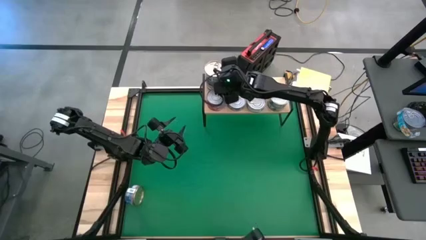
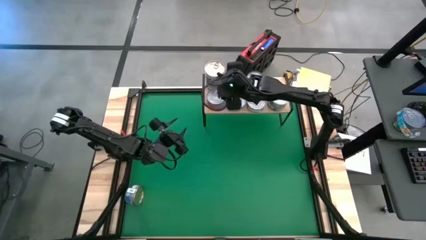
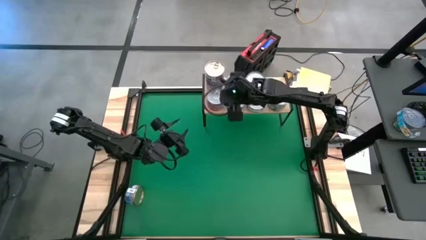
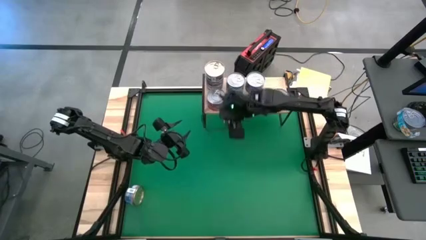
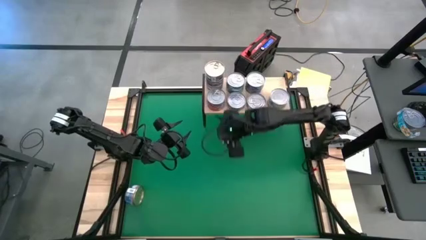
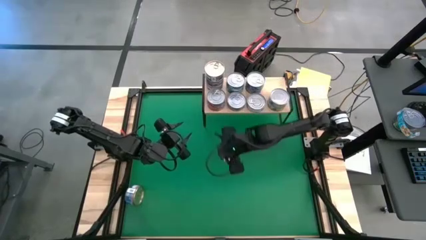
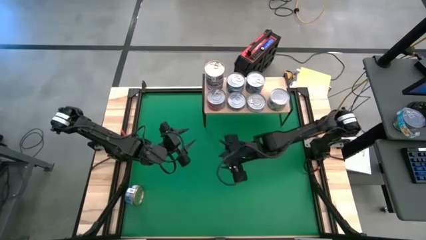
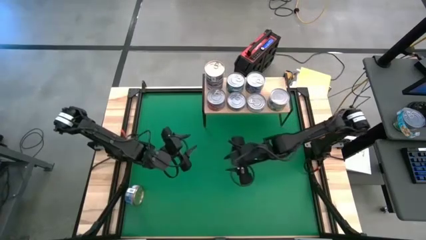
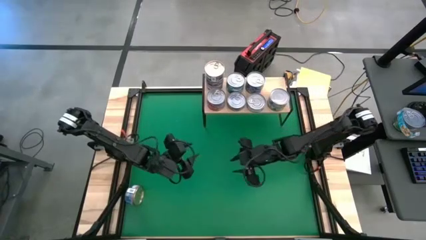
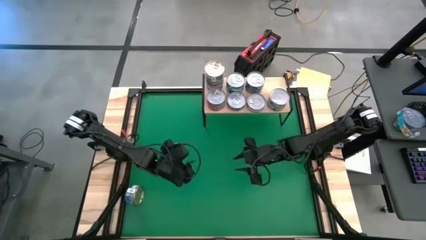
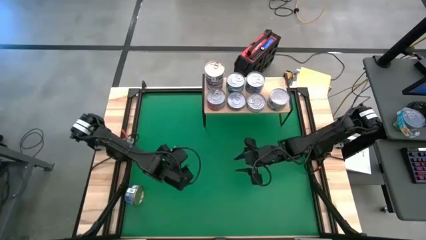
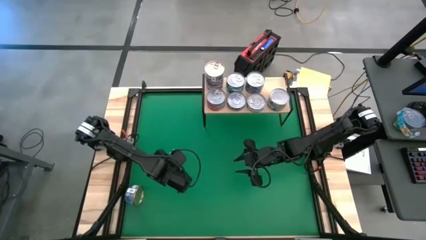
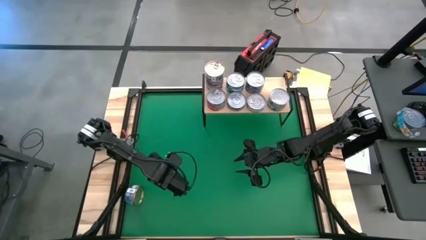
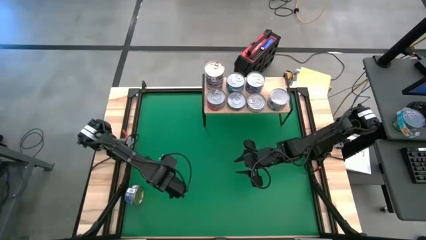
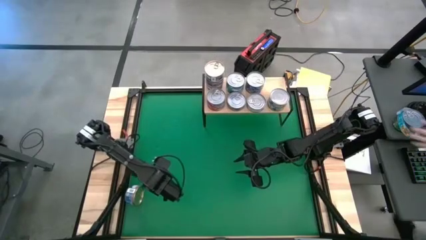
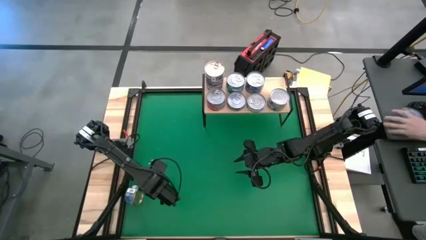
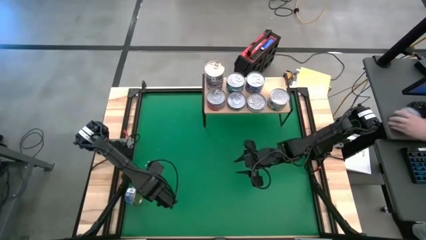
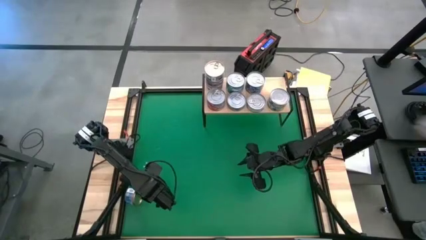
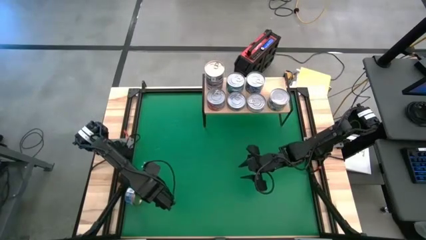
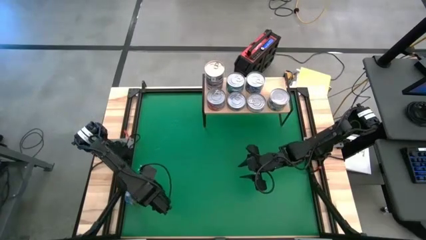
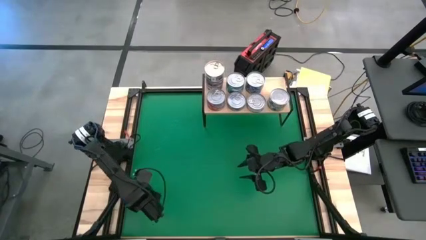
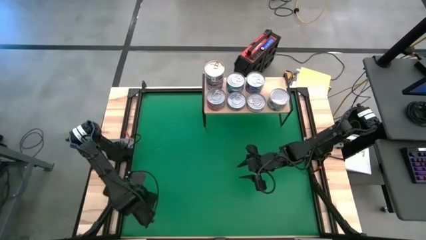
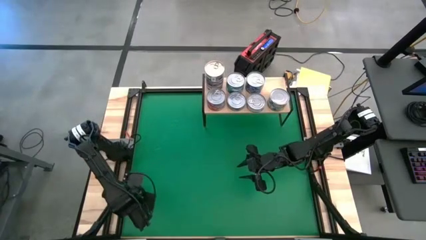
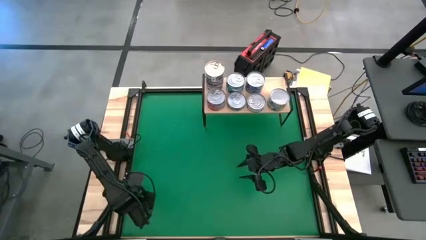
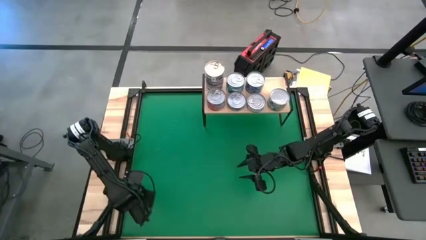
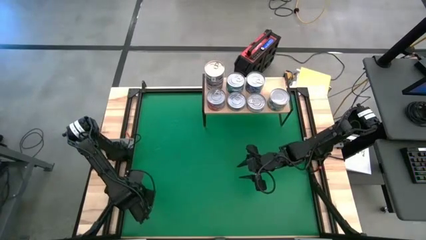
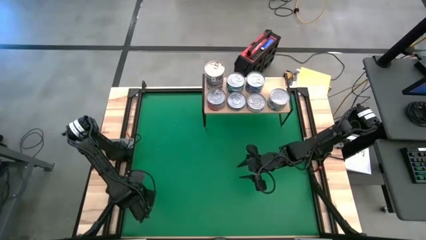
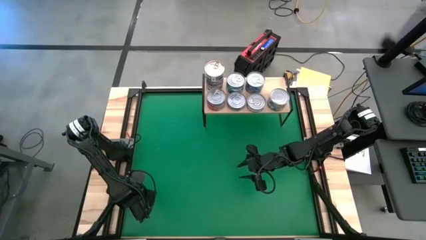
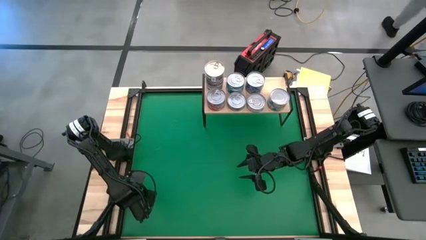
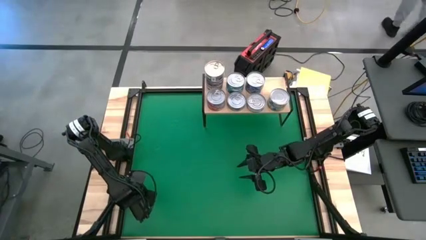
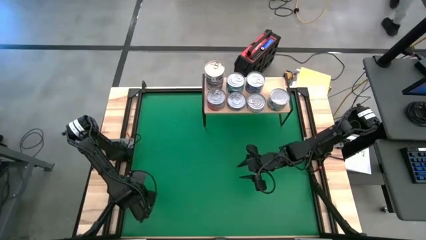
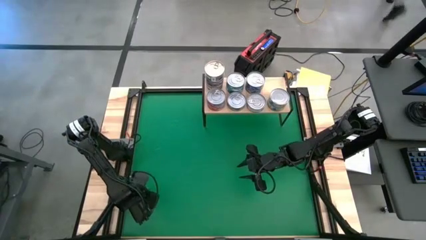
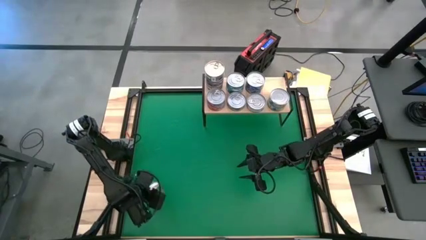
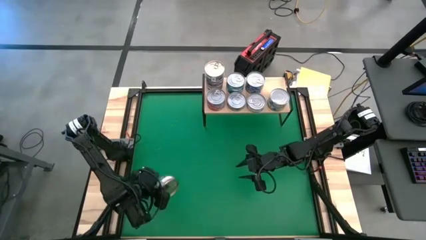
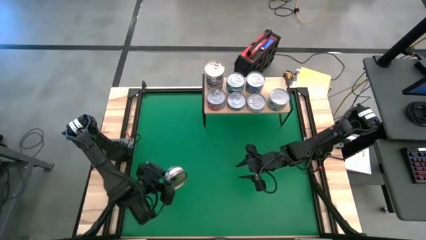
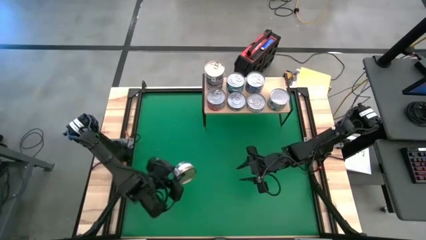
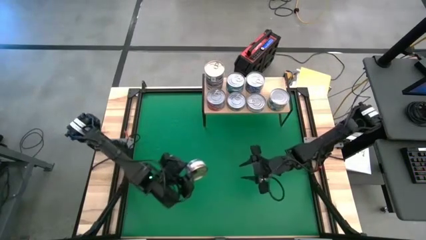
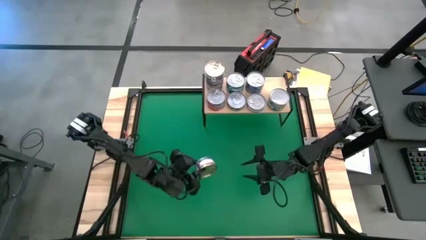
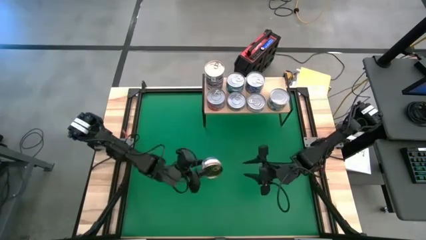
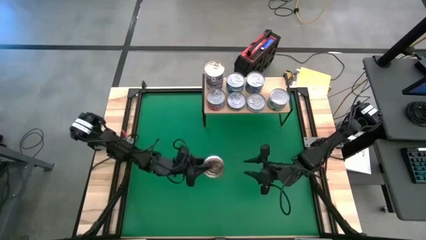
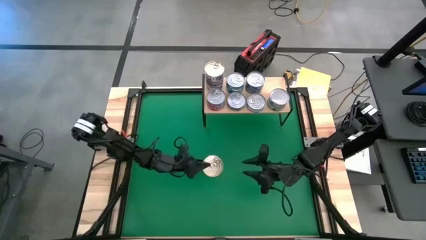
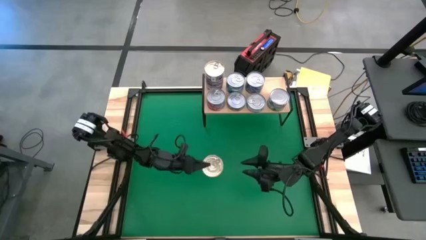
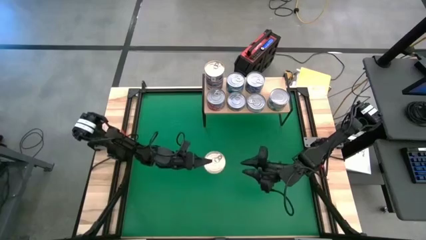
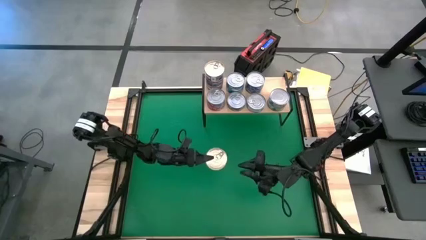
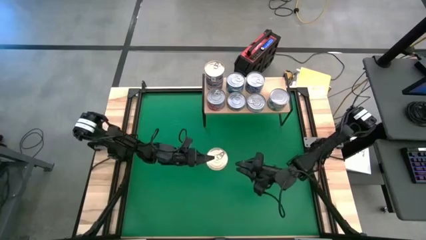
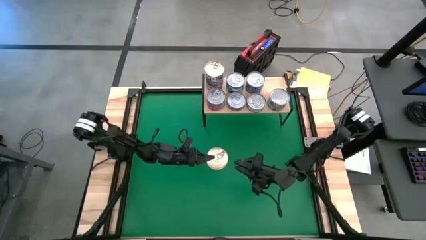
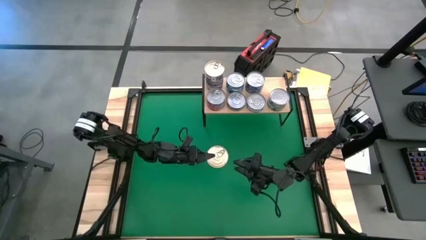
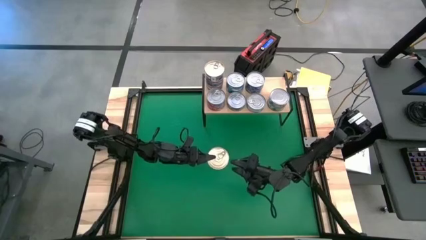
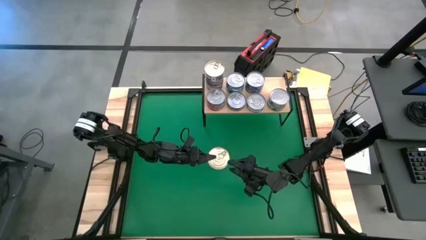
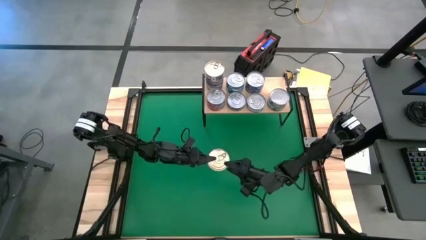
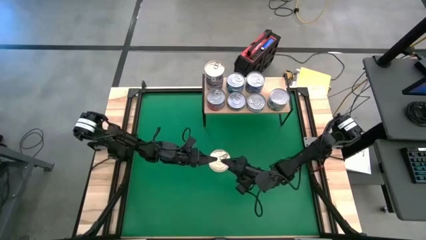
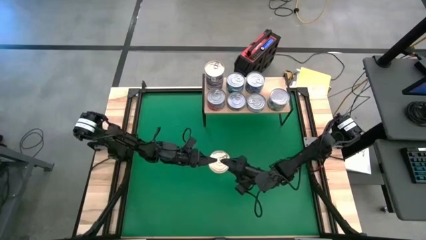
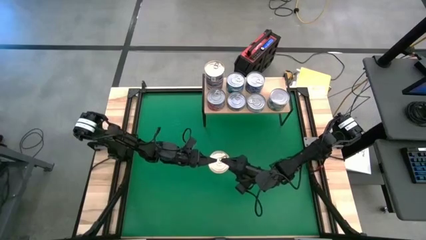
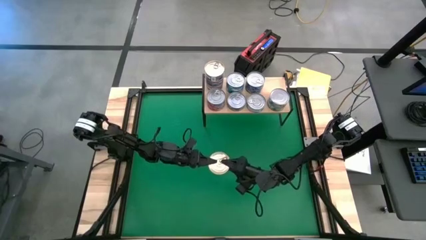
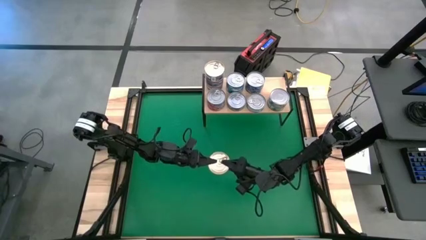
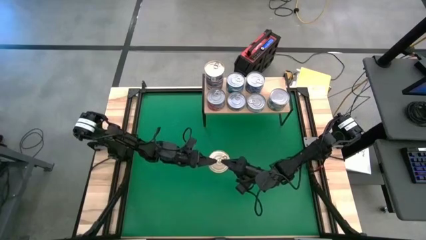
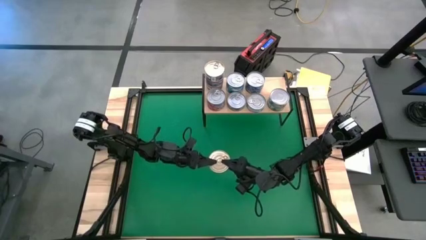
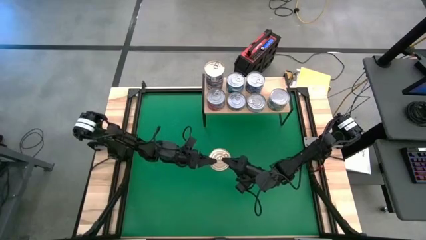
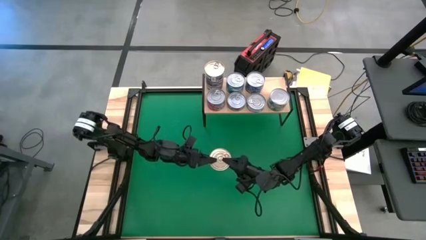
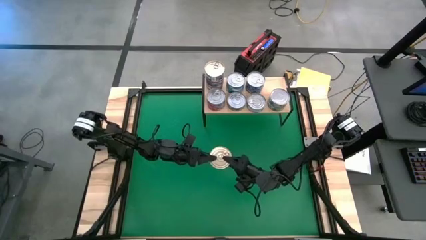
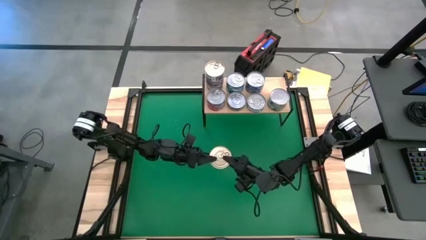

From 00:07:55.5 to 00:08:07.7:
Task: Stack canned seafood by type on shelf
Stack the blue/pink tuna can on top of the other blue/pink tuna can on the shelf
